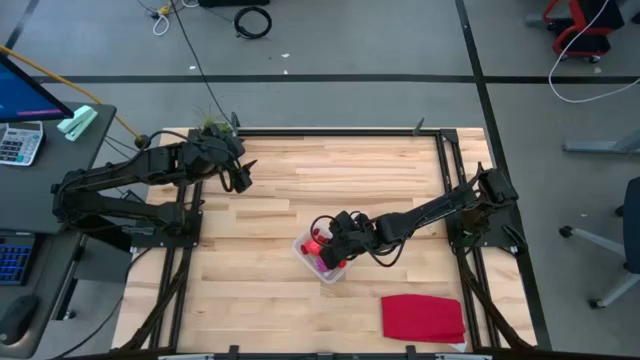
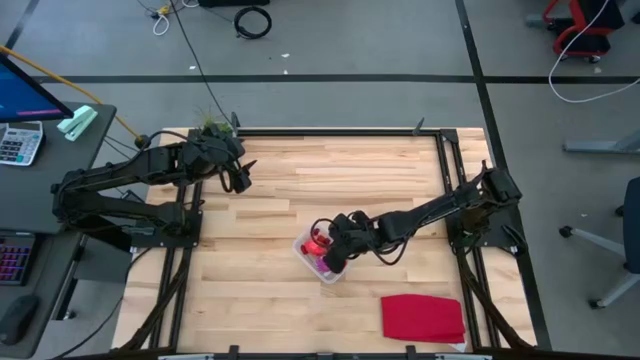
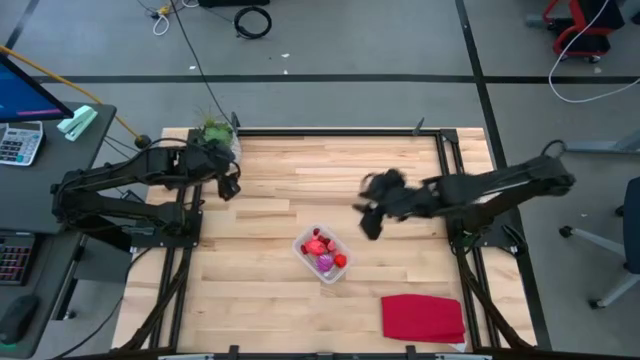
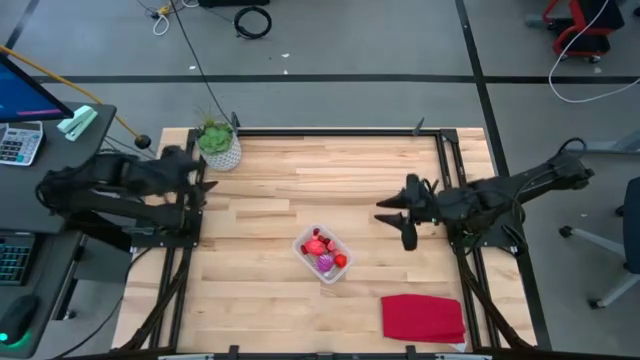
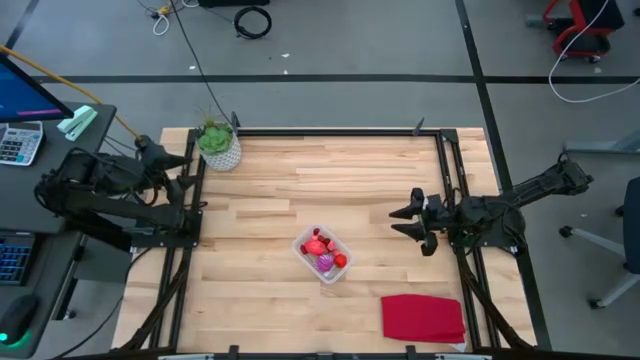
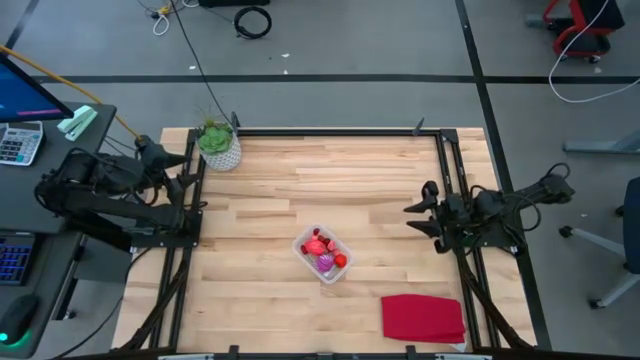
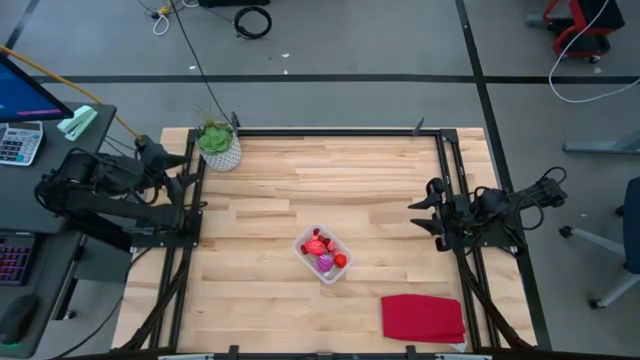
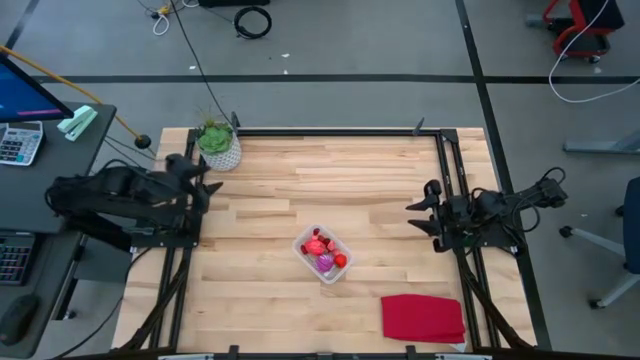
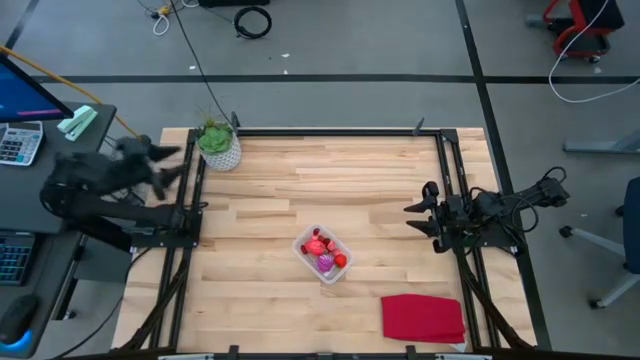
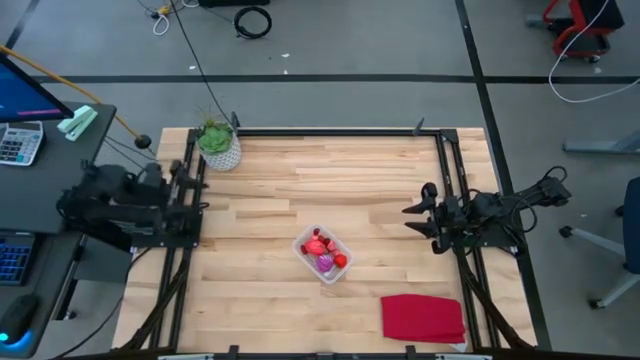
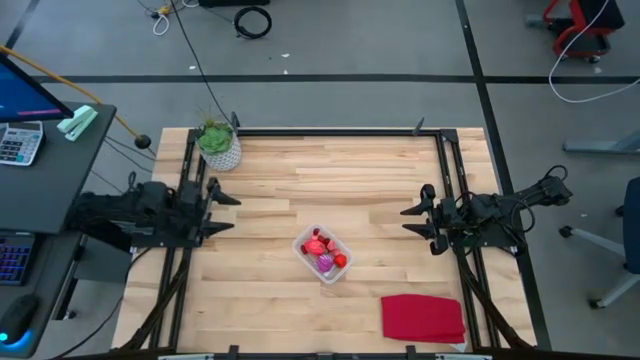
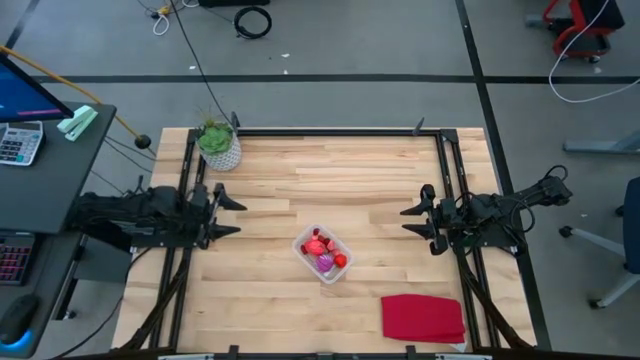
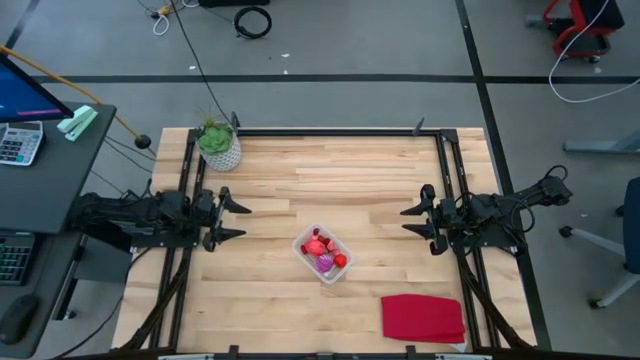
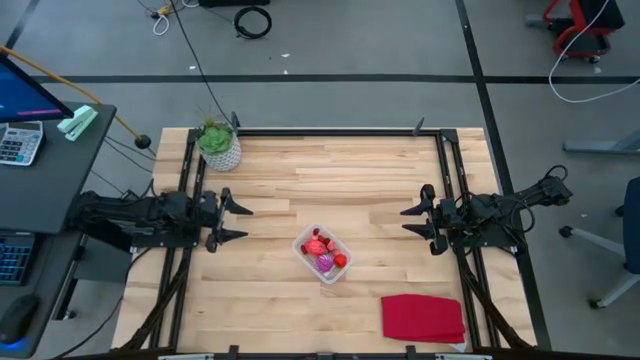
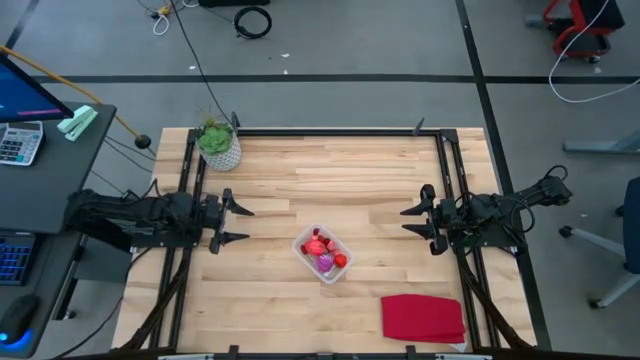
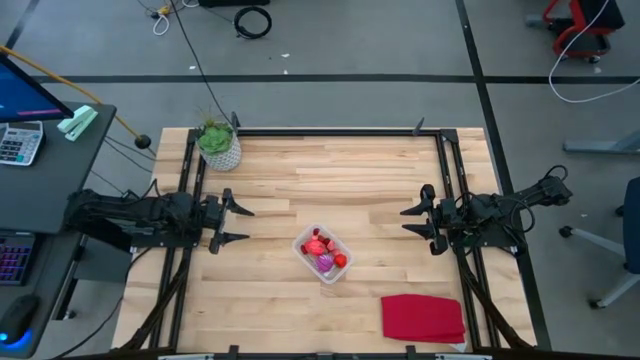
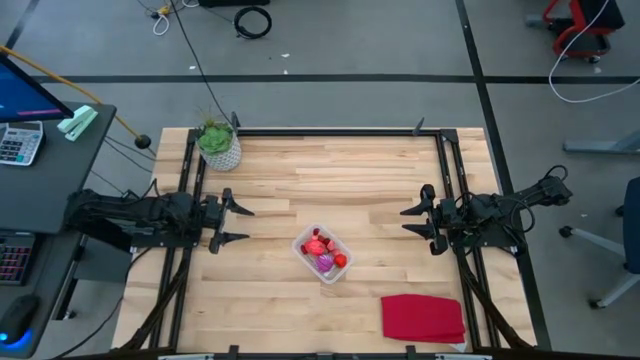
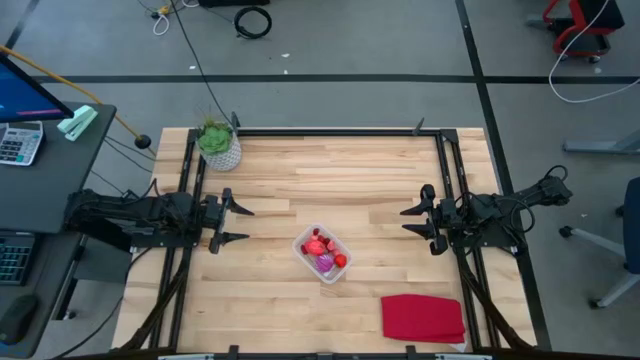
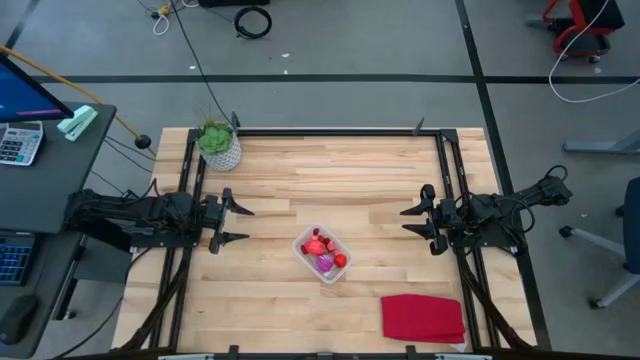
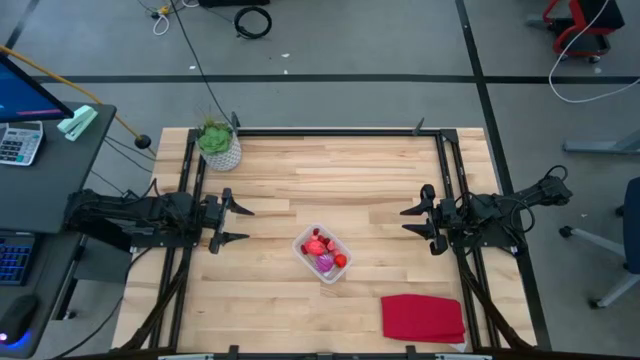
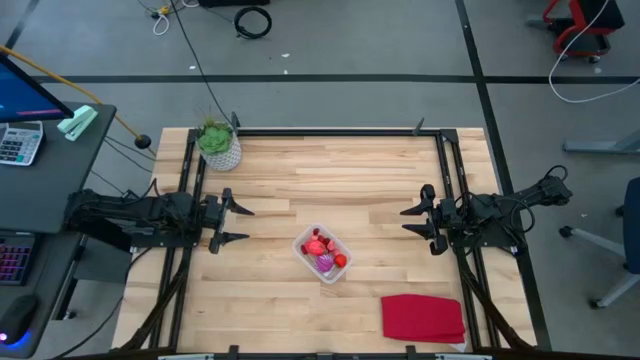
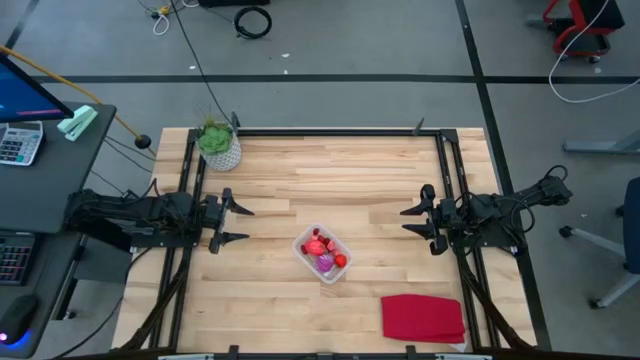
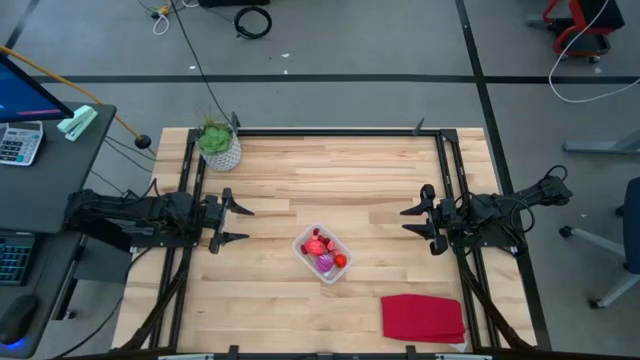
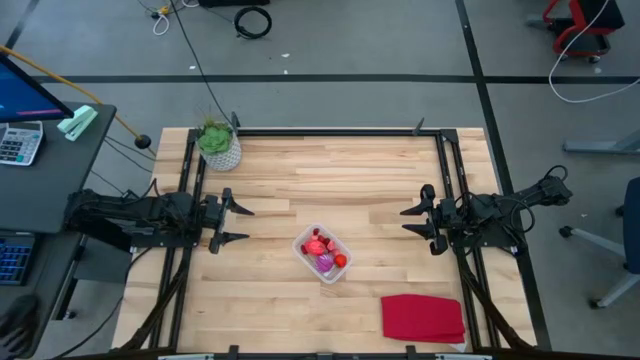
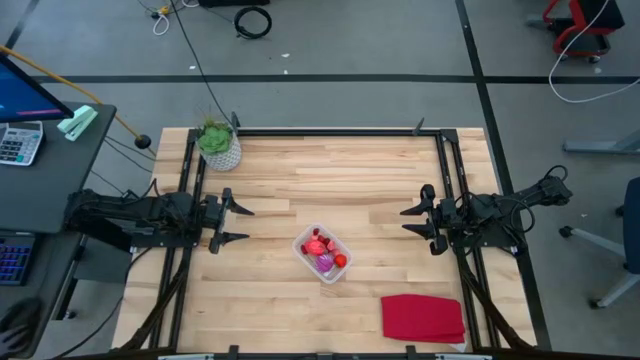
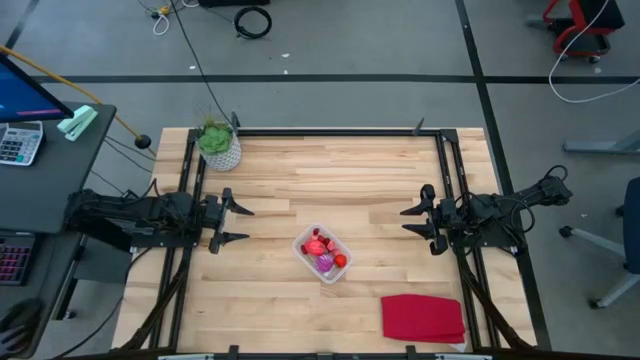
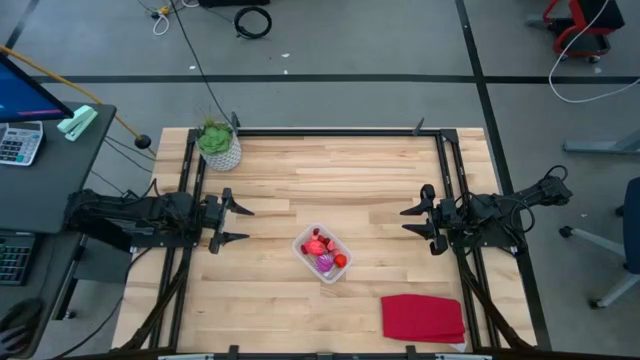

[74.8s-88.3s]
Task: Pick and placing Produce into tupperware
Return to Home Position

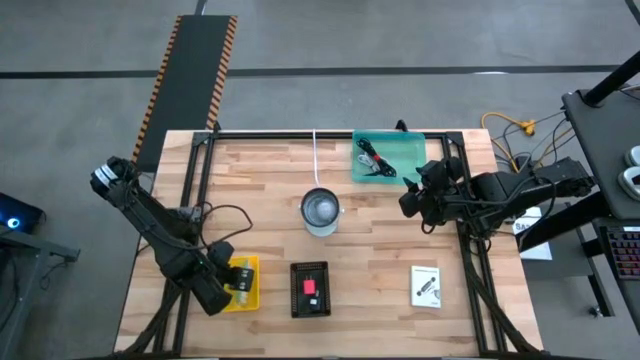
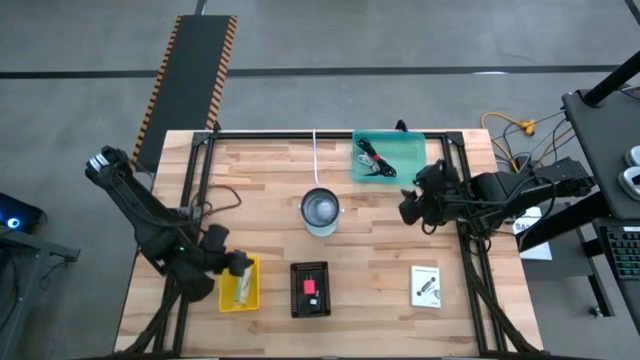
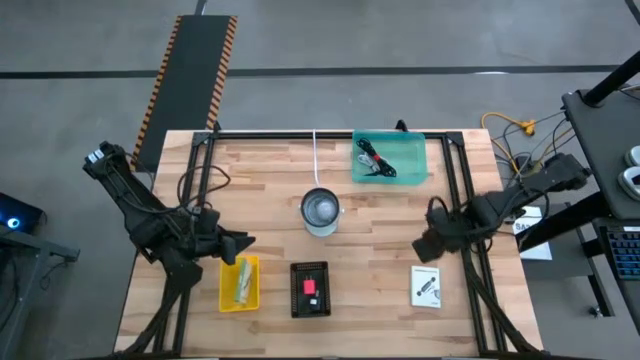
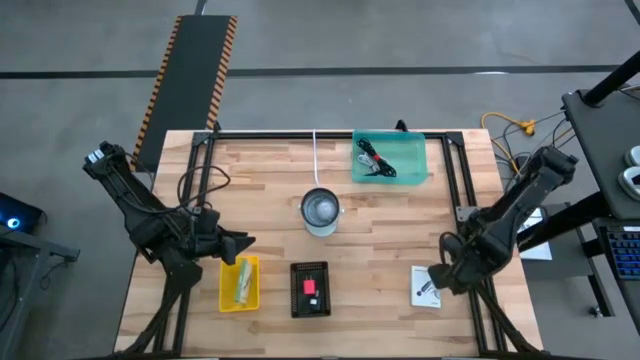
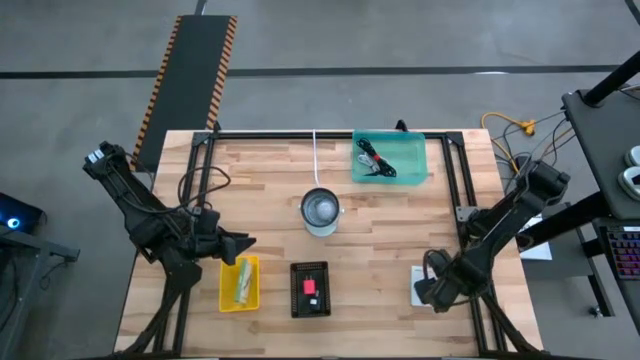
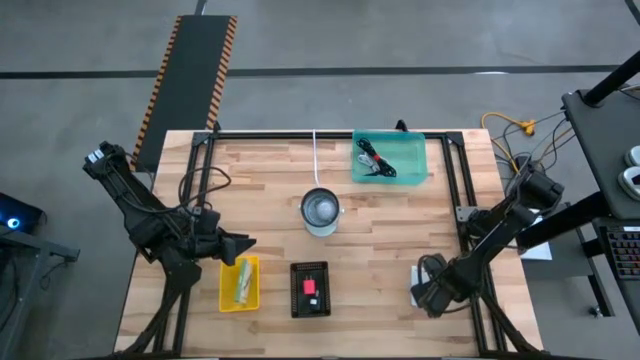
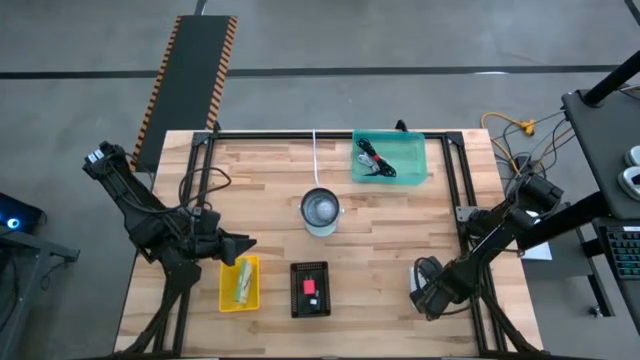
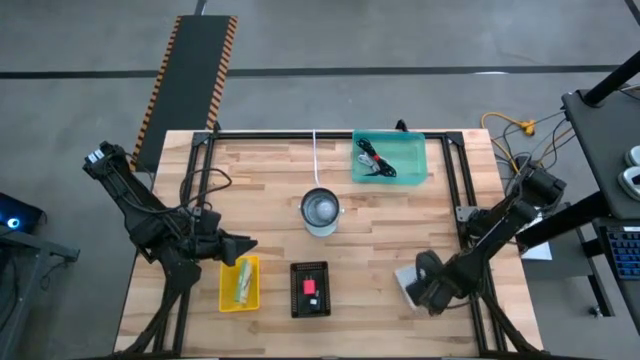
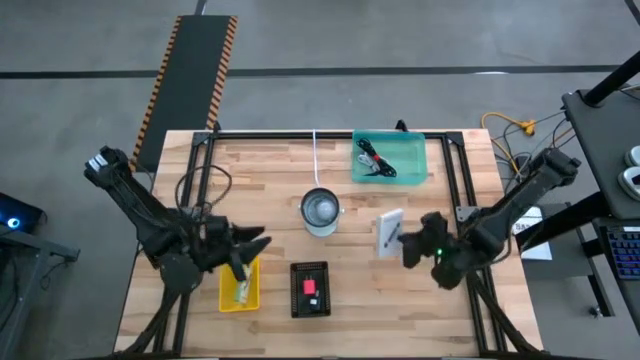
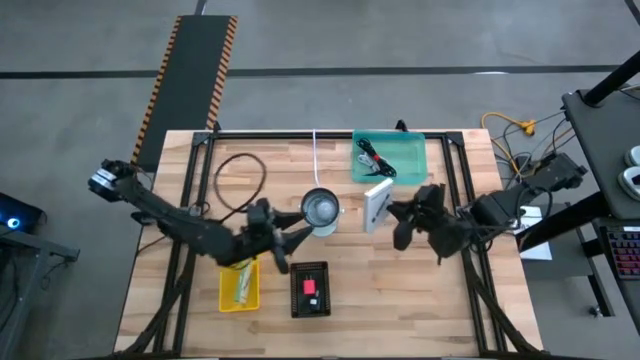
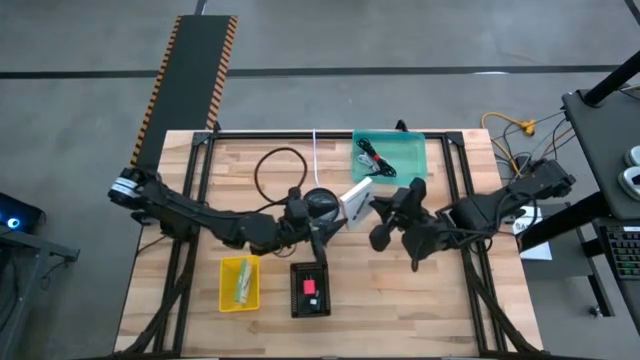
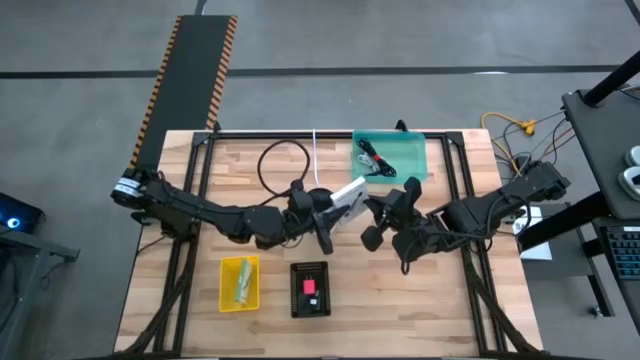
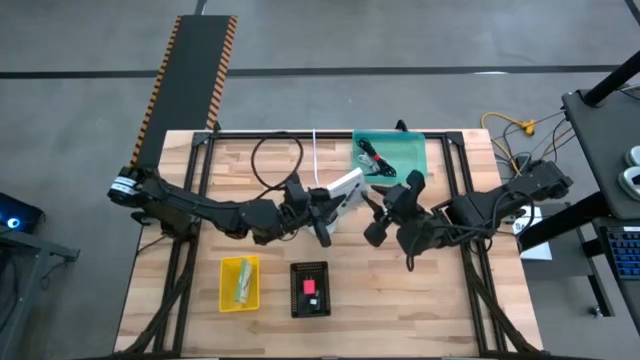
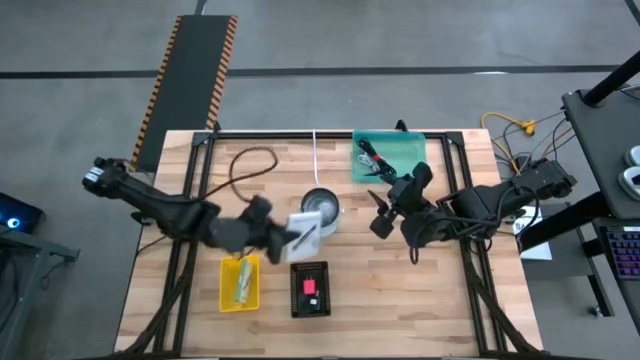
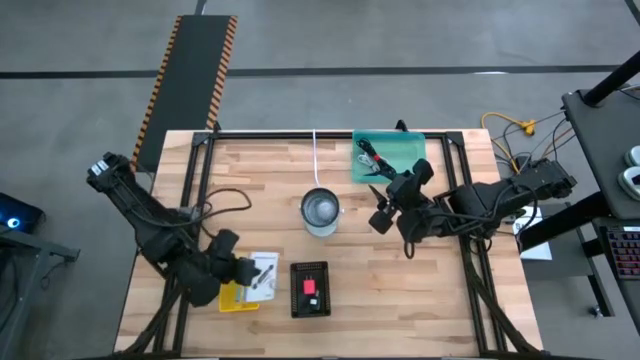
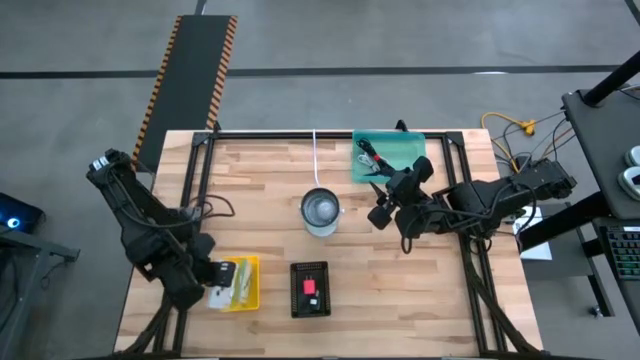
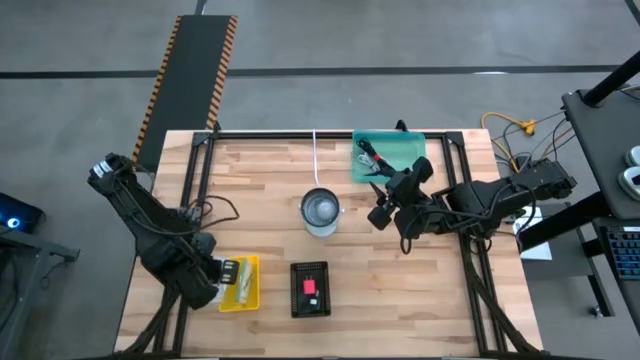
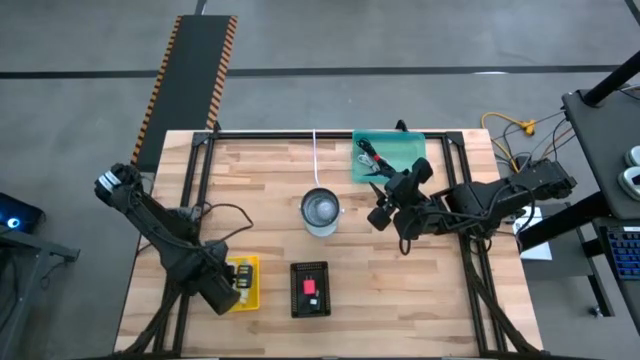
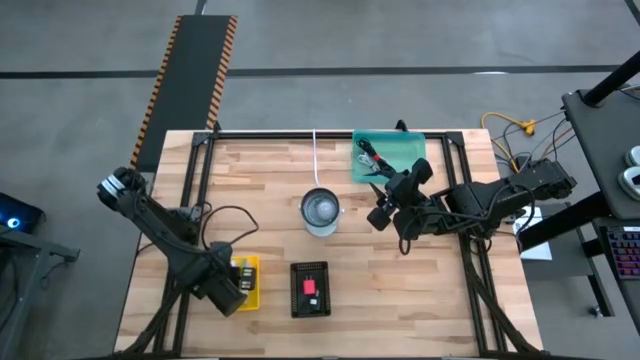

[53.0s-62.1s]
Task: Pick and place items into bin
Put the card reader box into the yellow bin
